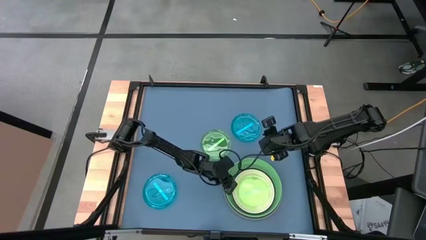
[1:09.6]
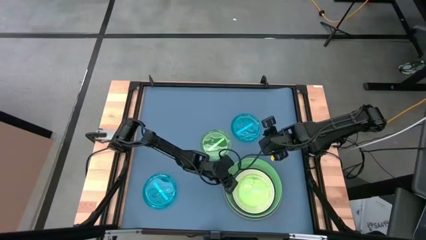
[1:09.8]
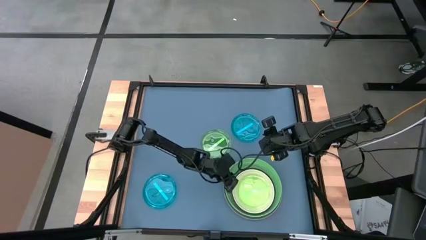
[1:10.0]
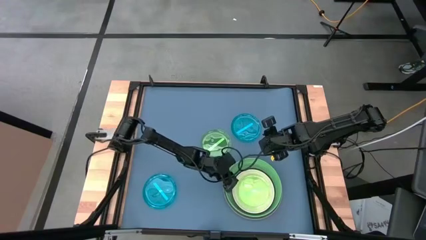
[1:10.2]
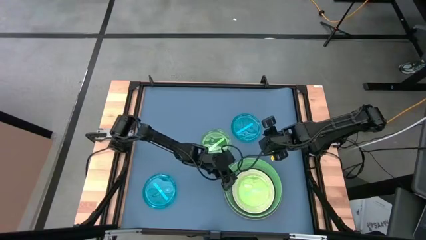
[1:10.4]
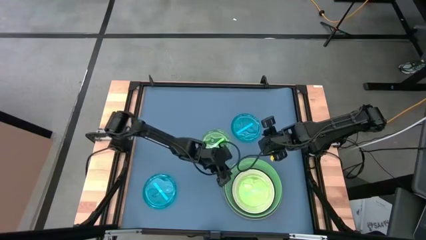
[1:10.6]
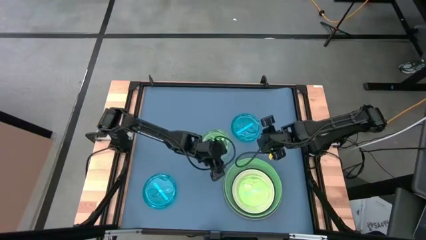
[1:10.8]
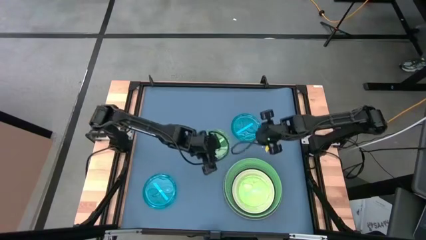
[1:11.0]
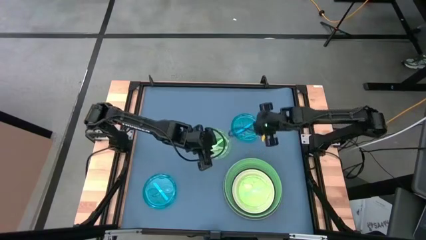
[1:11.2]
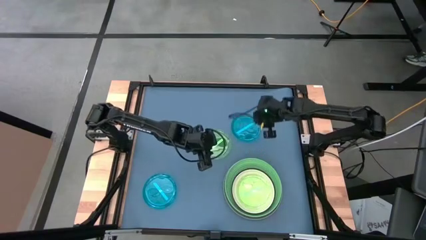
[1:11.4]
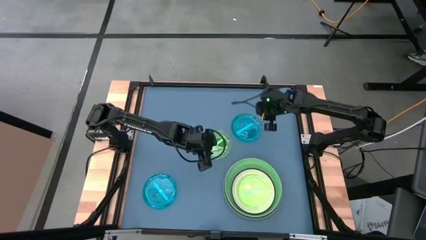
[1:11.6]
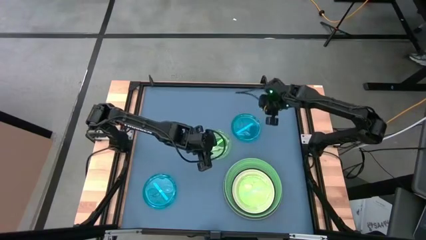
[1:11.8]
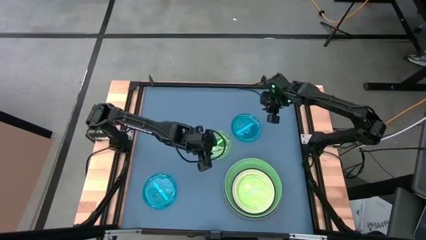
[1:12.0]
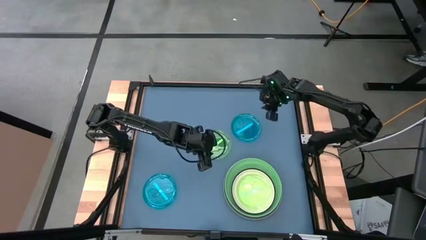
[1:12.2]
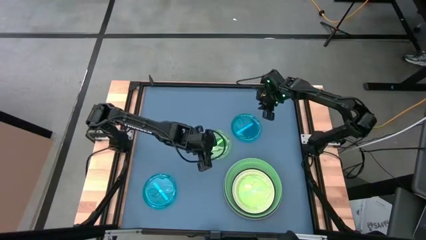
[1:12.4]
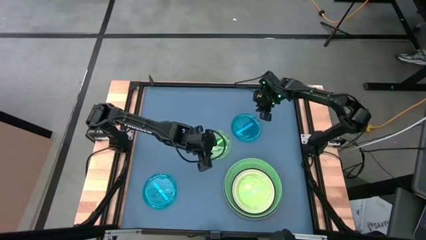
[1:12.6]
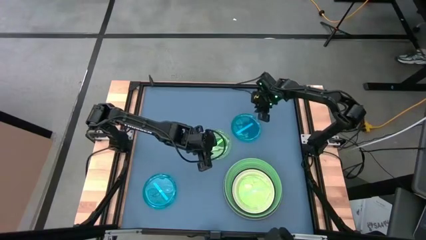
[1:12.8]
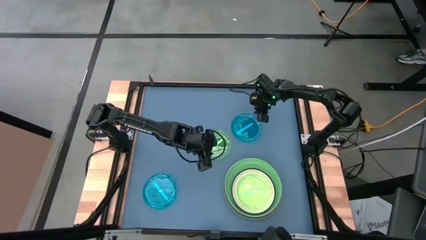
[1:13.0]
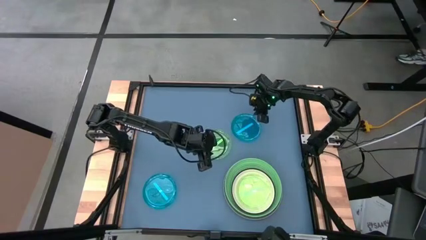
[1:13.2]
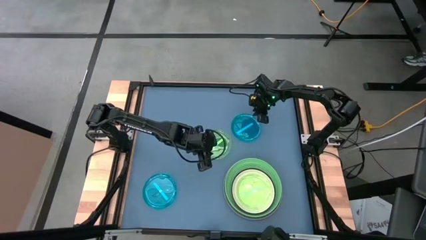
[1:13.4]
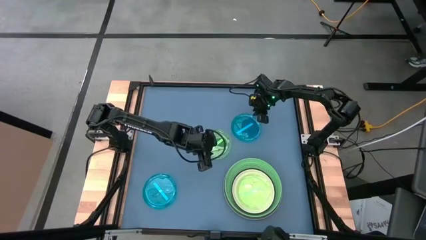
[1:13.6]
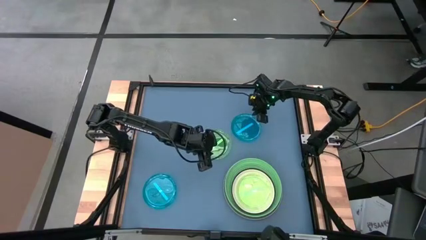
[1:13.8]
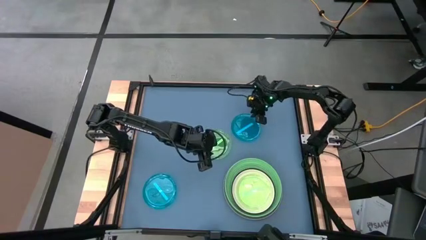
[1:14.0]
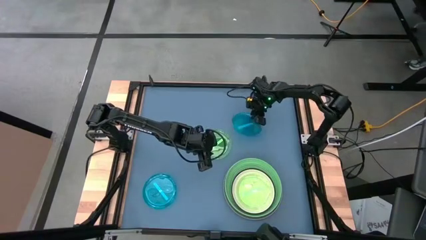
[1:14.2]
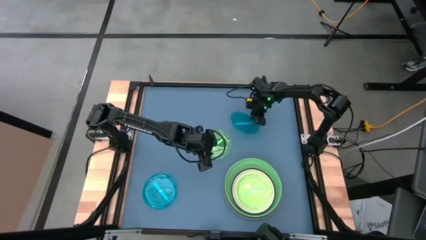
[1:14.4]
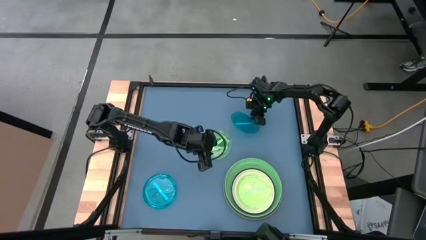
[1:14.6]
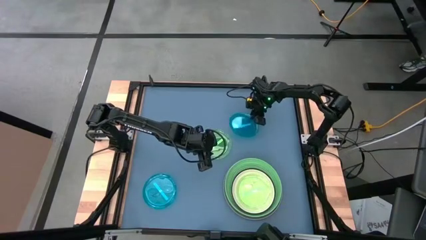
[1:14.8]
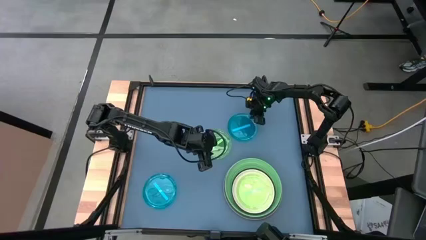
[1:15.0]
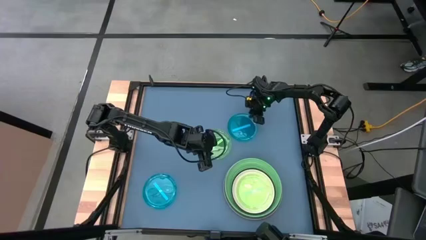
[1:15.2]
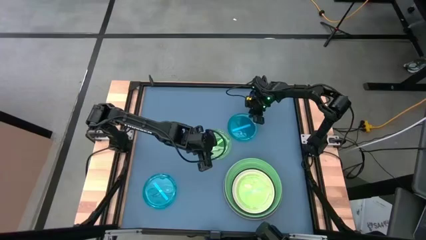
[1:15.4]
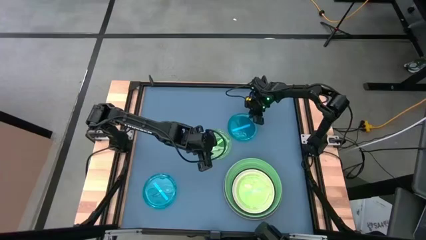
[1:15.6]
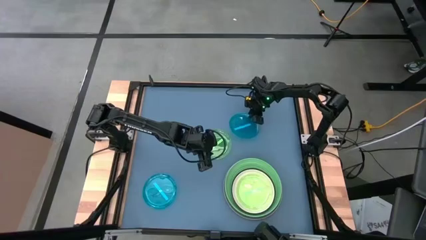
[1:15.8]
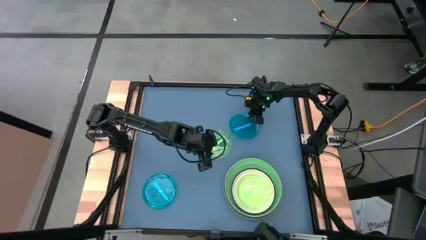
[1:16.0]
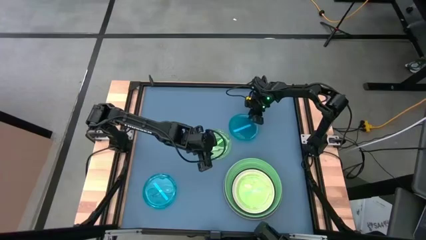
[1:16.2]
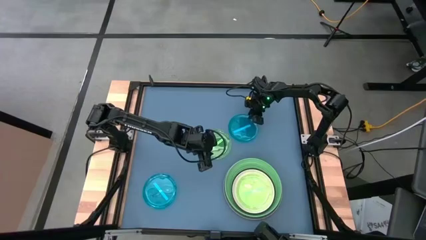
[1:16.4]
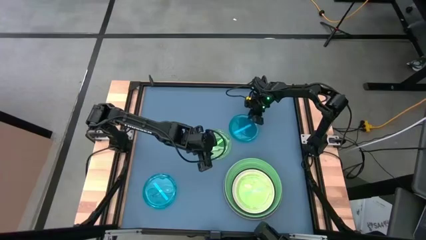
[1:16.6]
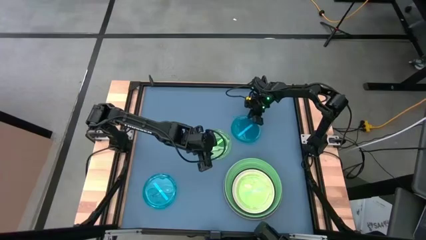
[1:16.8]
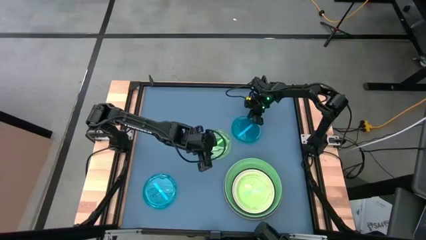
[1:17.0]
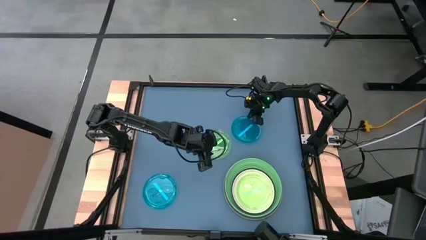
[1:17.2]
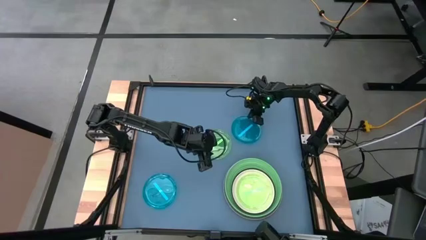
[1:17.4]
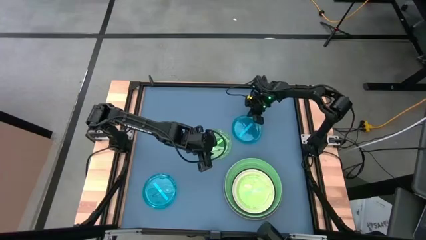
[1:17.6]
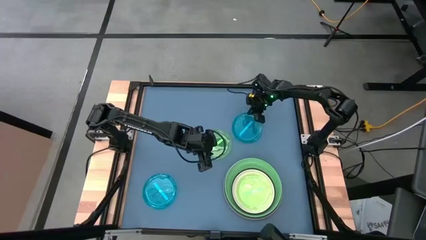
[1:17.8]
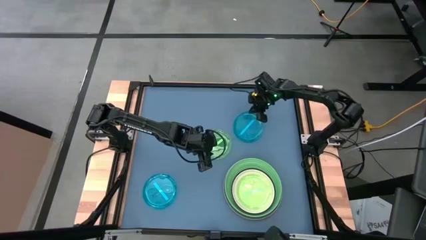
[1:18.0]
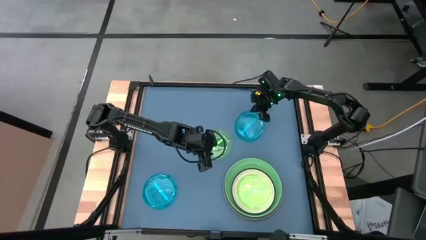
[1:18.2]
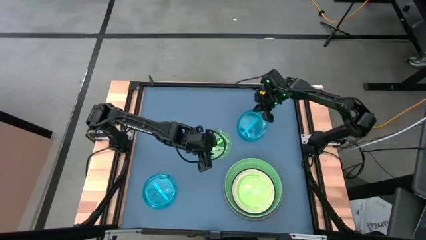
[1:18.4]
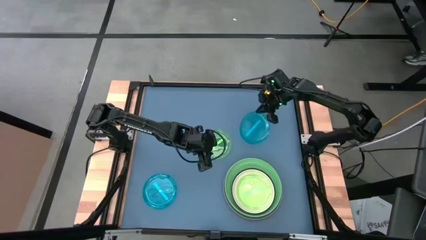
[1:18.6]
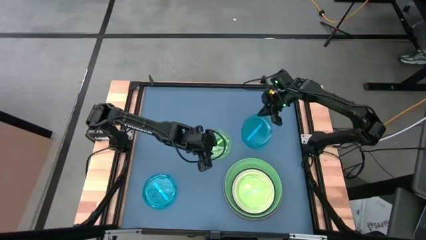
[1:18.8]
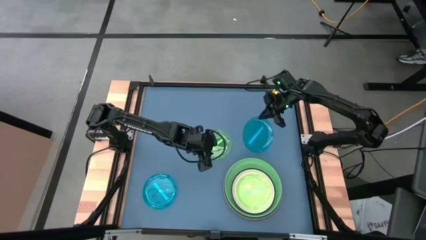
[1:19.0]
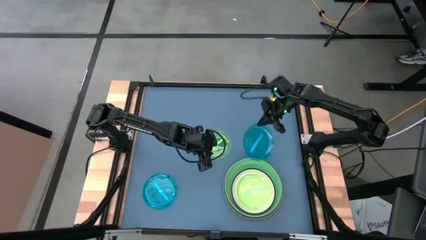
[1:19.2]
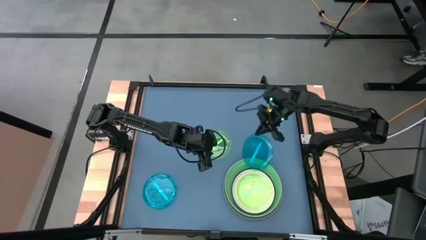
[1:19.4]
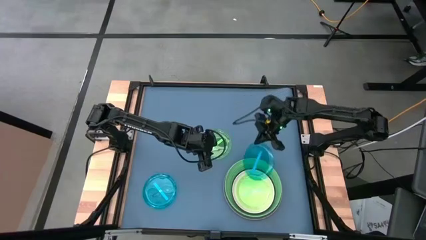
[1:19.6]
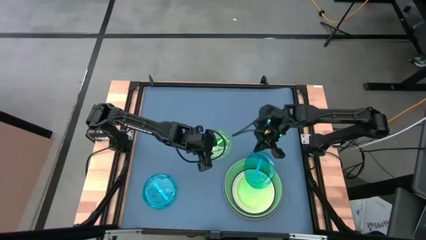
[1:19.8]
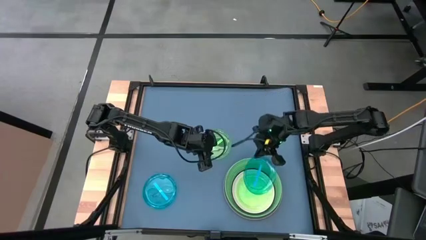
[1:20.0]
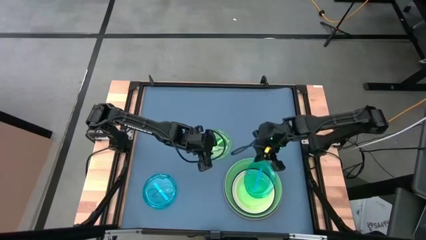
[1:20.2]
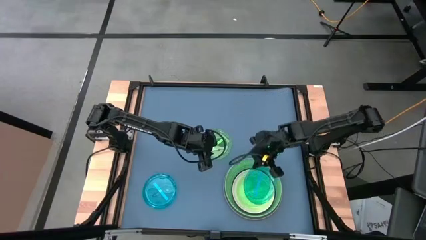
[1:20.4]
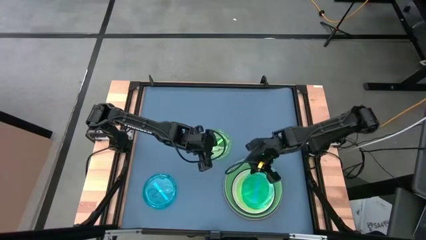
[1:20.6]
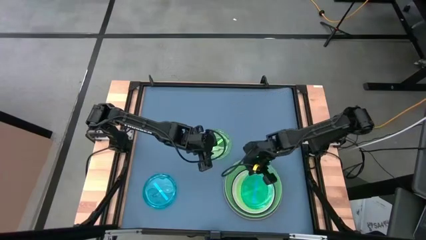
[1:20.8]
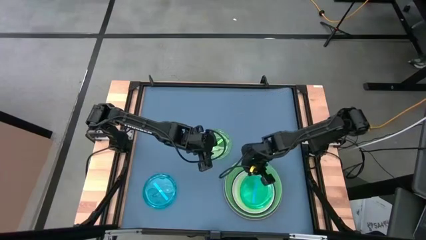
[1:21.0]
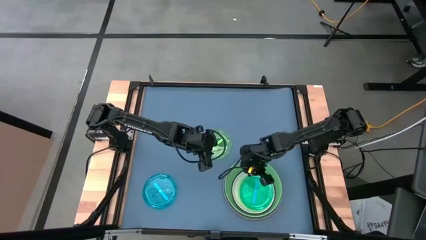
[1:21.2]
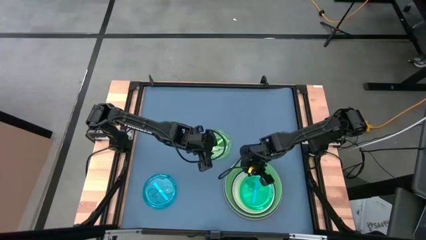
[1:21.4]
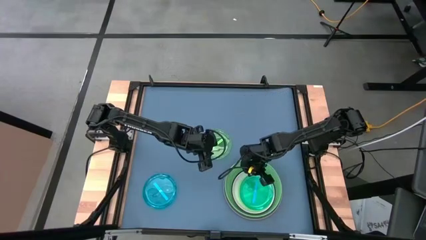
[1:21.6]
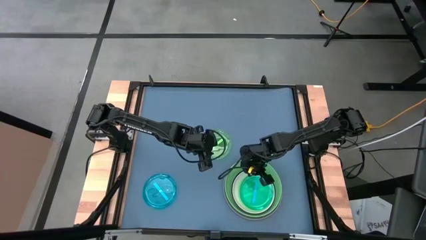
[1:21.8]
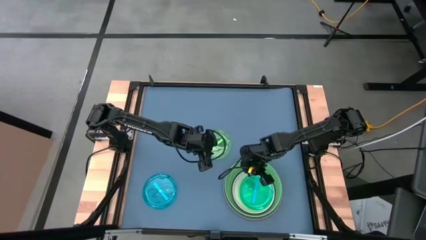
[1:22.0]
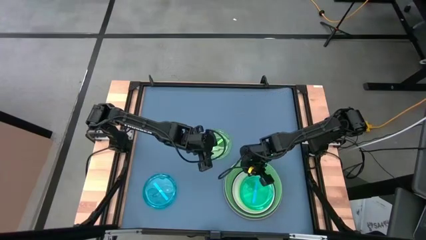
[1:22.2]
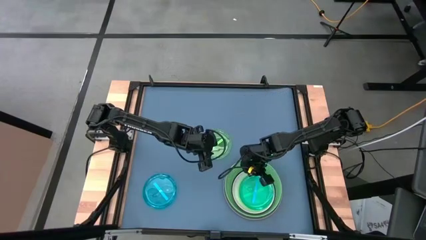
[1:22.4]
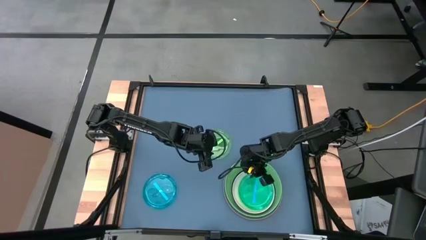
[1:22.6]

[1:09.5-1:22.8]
Task: Stack plastic plates
Stack the top blue plate on top of the small green plate

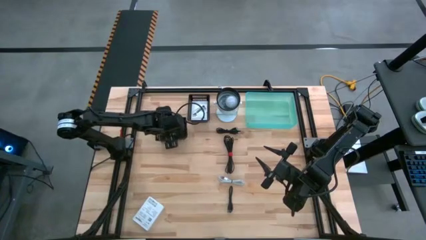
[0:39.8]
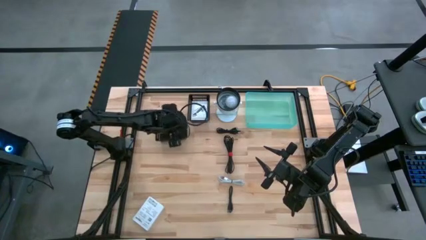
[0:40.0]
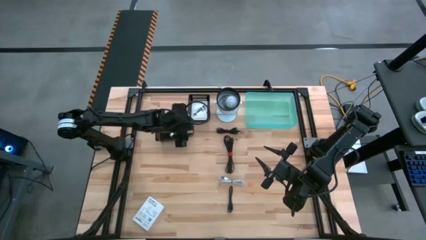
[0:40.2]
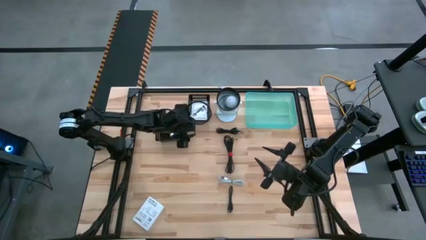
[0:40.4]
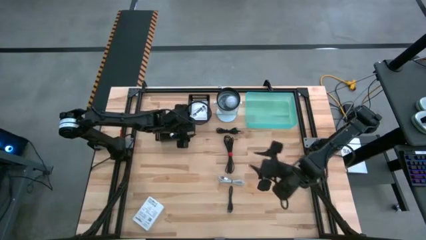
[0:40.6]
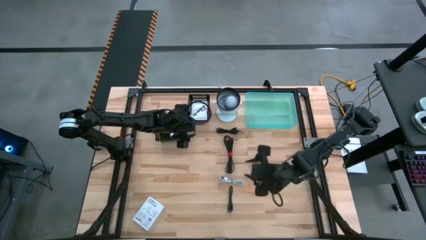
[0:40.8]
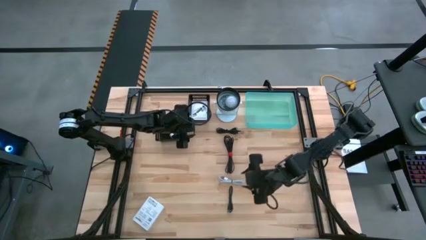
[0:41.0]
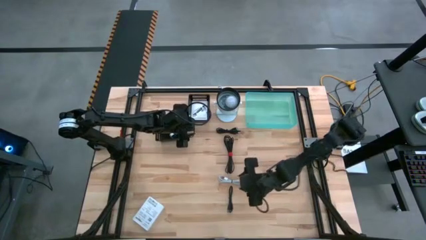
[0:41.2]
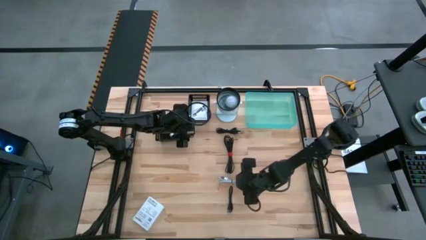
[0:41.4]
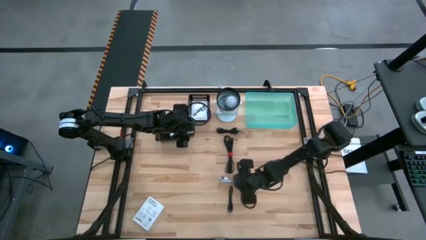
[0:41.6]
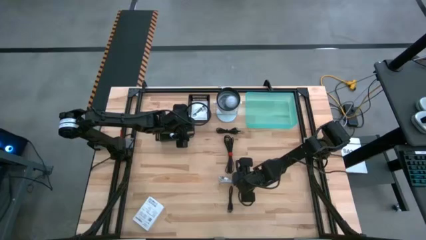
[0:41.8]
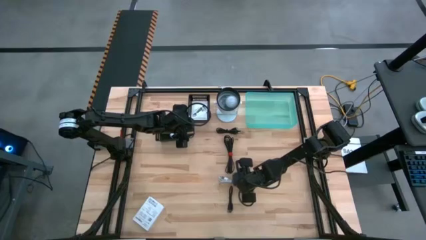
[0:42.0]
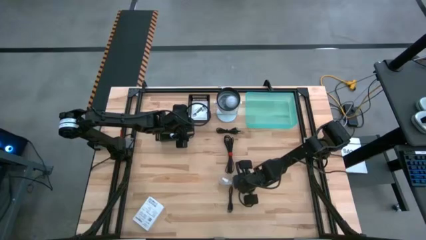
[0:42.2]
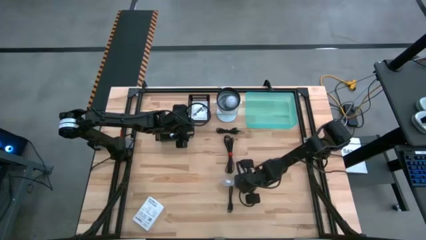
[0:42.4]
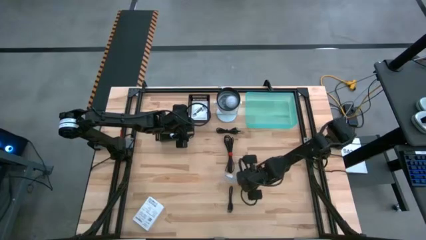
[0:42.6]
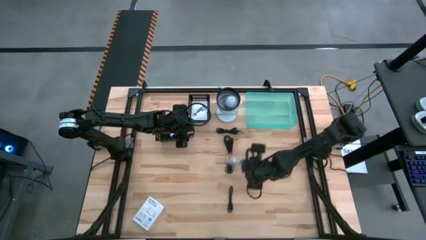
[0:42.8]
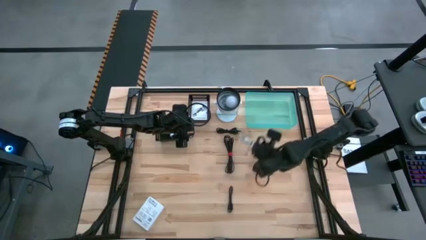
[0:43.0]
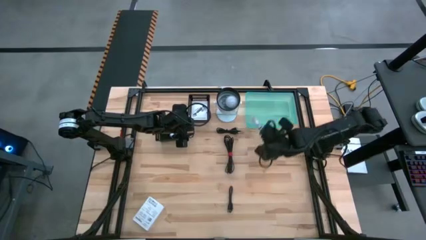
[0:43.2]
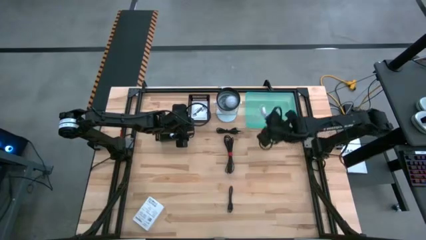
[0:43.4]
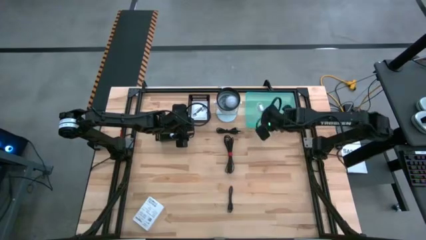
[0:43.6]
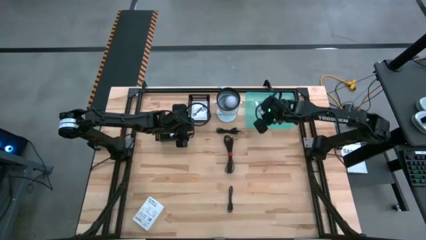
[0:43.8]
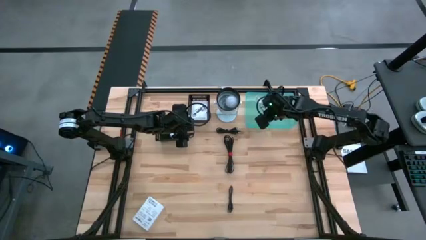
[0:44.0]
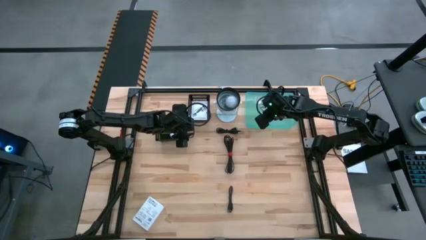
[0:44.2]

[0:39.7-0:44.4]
Task: Pick and place items into bin
Put the white charger cable into the light blue bin
